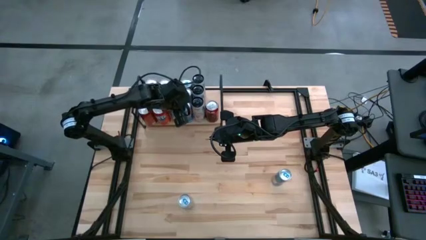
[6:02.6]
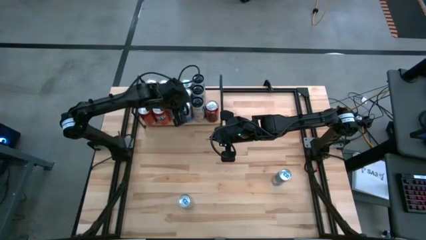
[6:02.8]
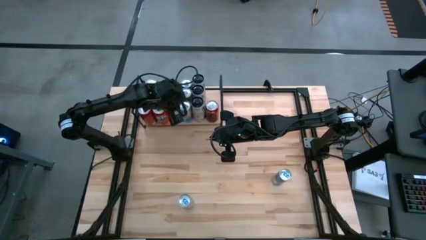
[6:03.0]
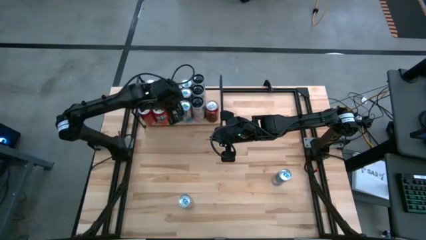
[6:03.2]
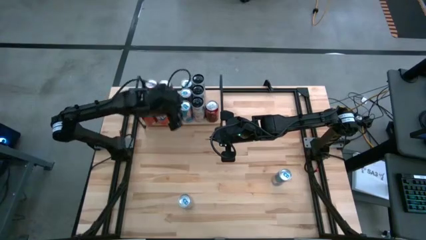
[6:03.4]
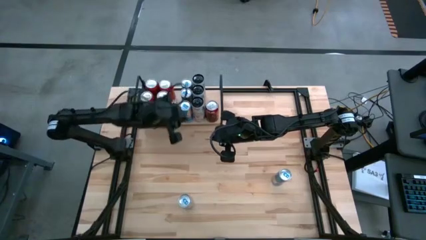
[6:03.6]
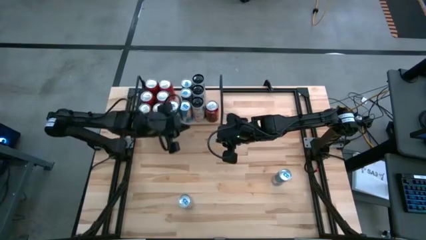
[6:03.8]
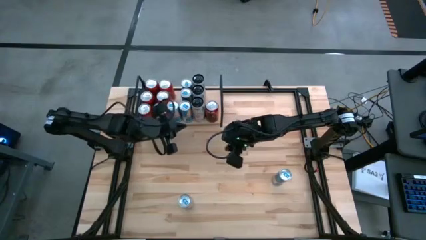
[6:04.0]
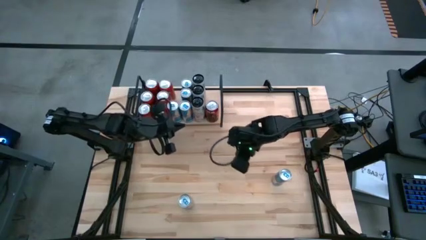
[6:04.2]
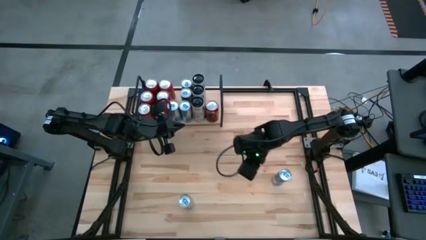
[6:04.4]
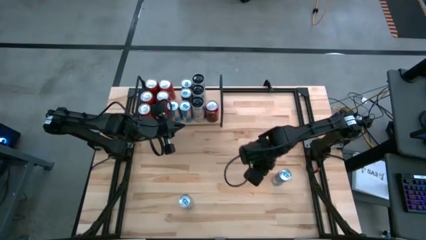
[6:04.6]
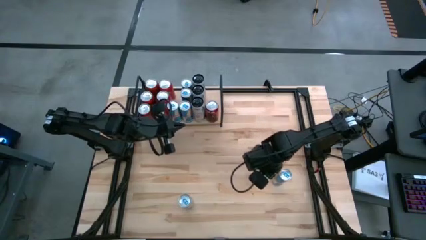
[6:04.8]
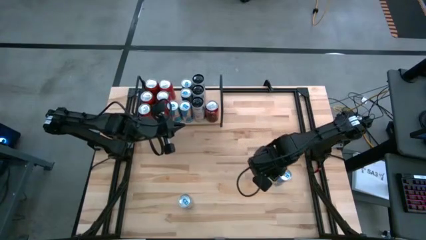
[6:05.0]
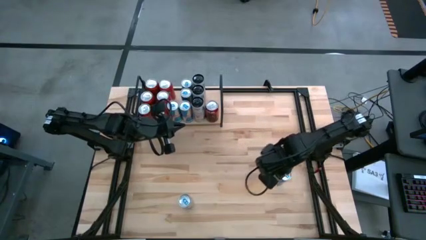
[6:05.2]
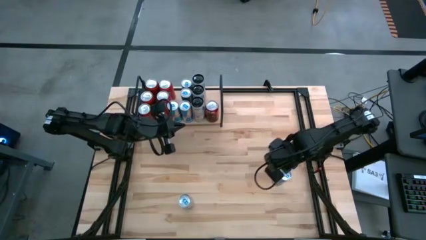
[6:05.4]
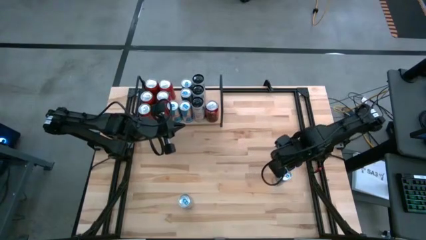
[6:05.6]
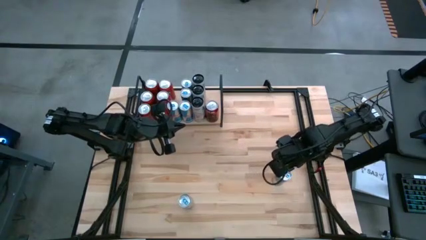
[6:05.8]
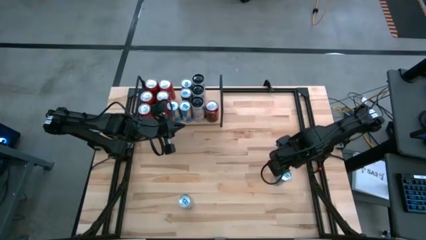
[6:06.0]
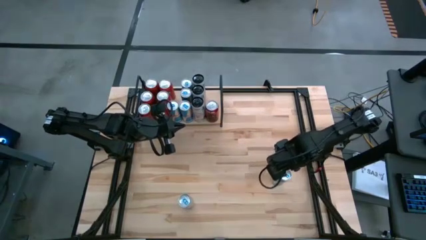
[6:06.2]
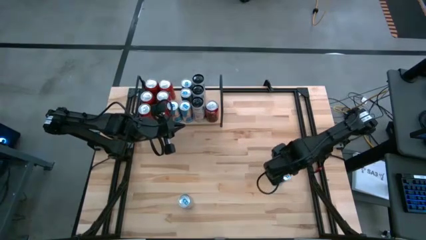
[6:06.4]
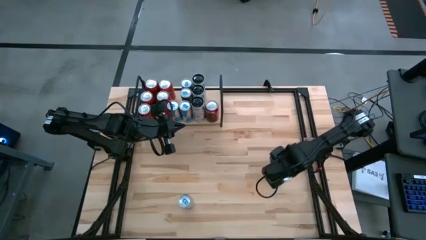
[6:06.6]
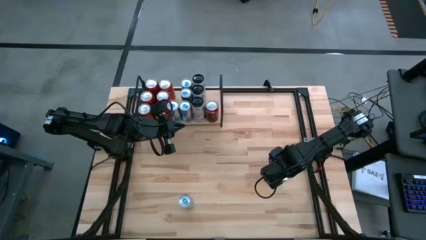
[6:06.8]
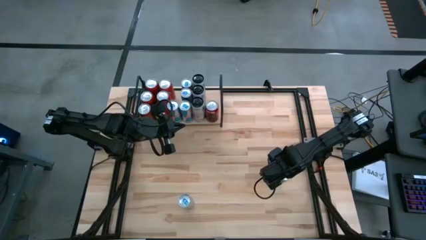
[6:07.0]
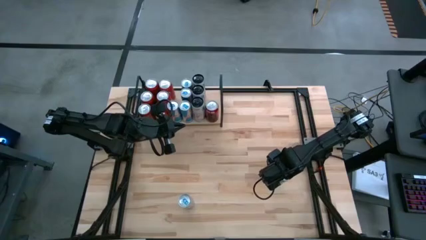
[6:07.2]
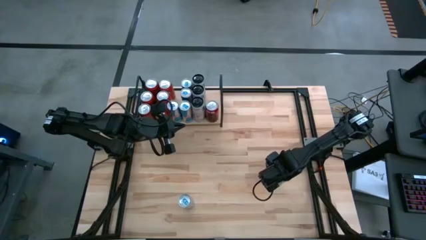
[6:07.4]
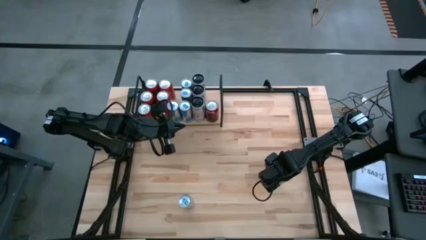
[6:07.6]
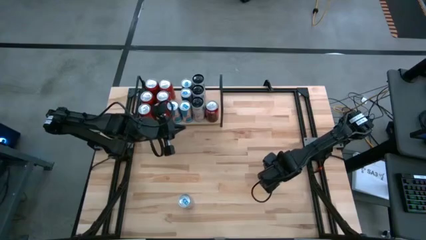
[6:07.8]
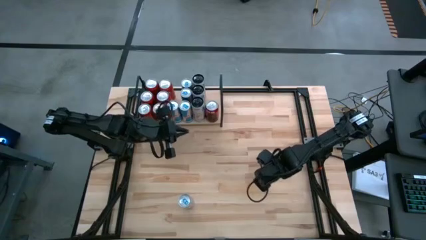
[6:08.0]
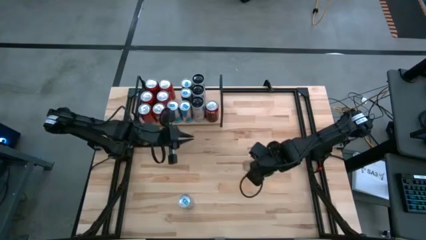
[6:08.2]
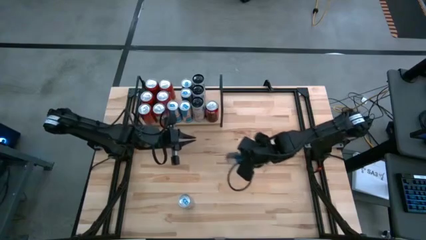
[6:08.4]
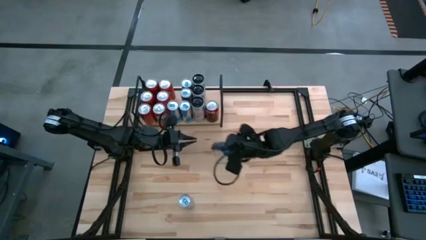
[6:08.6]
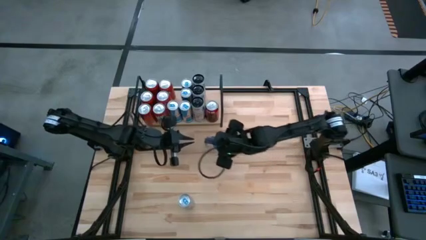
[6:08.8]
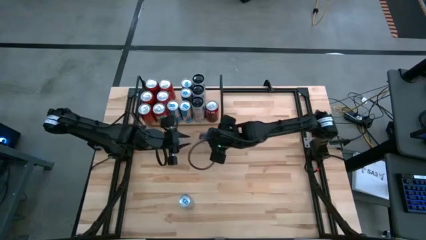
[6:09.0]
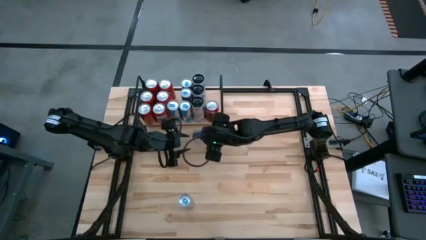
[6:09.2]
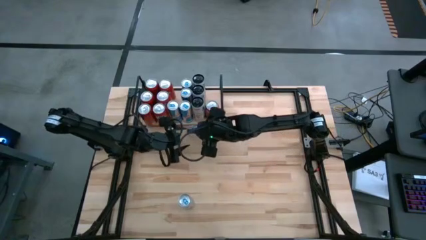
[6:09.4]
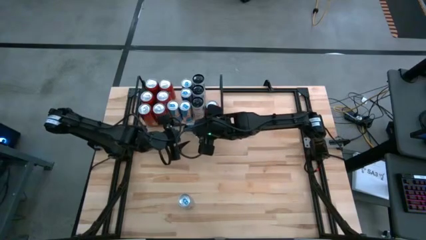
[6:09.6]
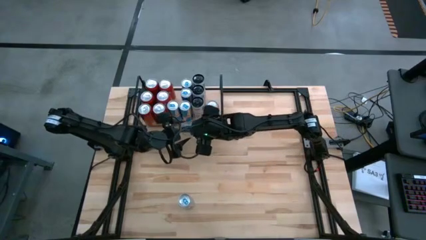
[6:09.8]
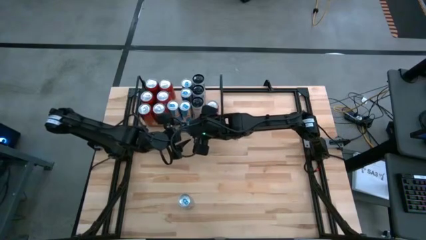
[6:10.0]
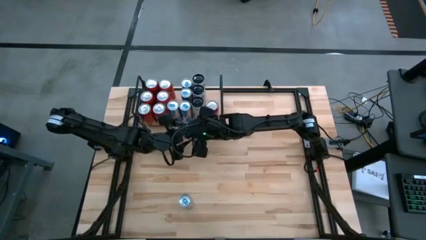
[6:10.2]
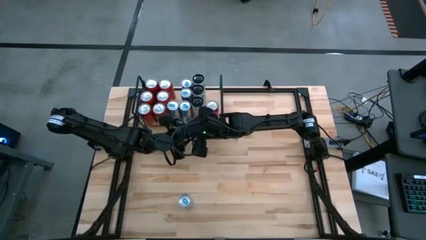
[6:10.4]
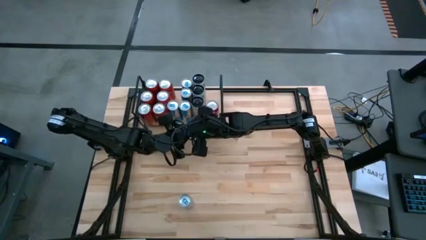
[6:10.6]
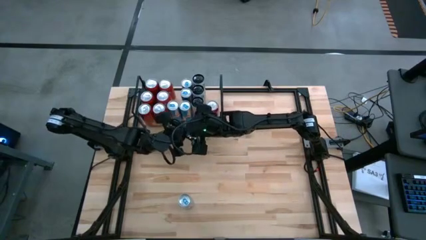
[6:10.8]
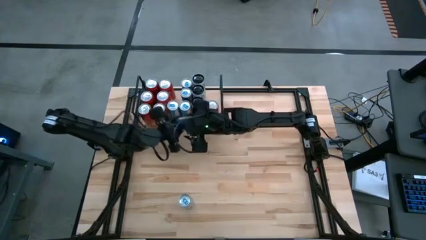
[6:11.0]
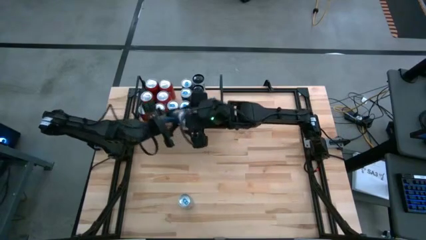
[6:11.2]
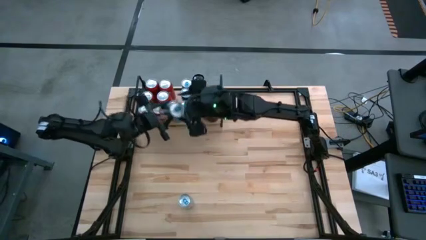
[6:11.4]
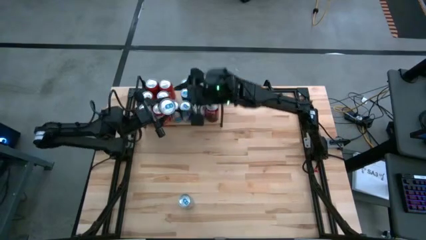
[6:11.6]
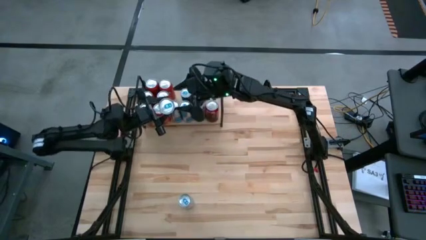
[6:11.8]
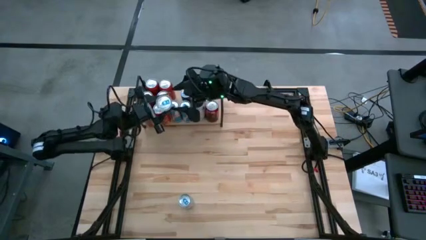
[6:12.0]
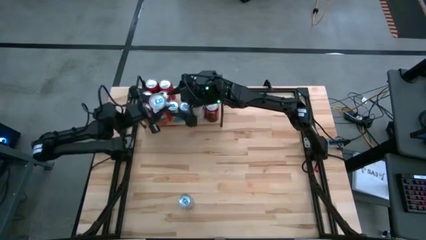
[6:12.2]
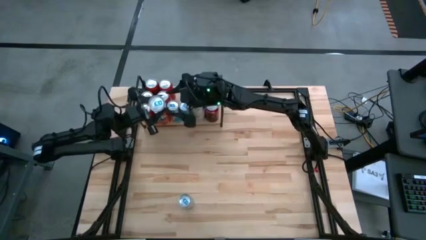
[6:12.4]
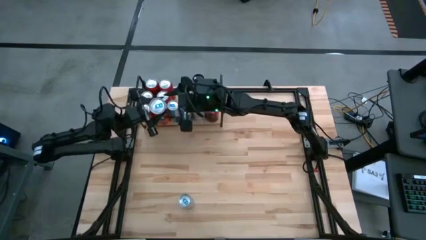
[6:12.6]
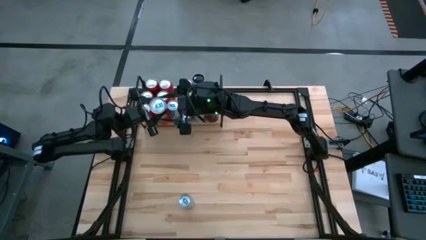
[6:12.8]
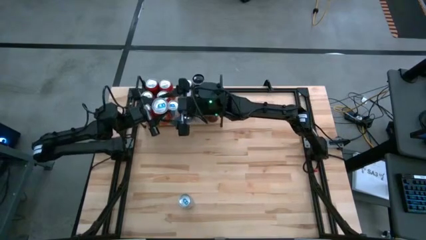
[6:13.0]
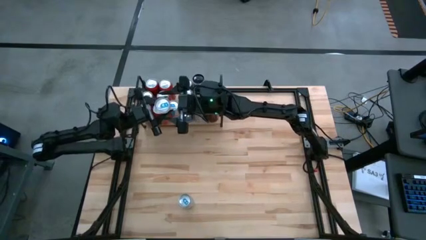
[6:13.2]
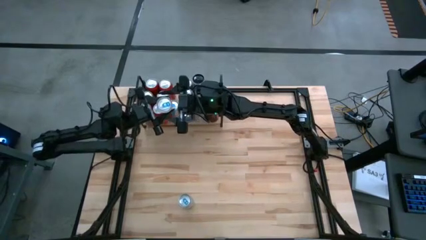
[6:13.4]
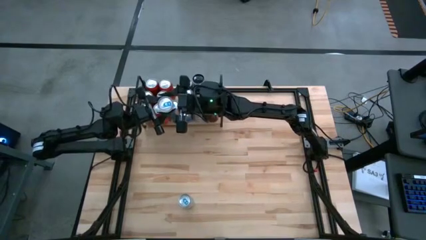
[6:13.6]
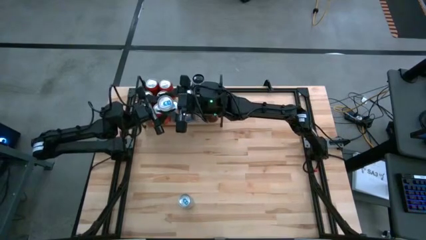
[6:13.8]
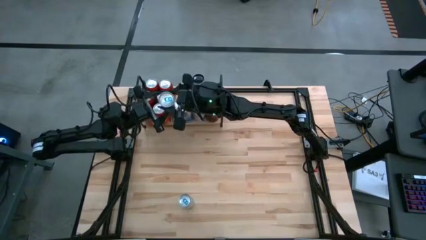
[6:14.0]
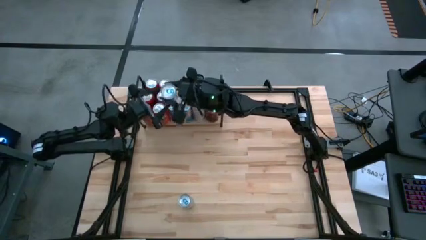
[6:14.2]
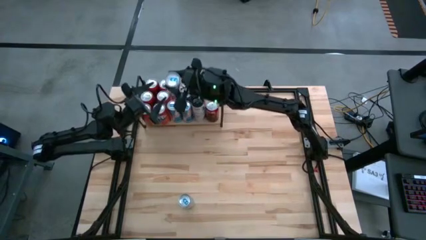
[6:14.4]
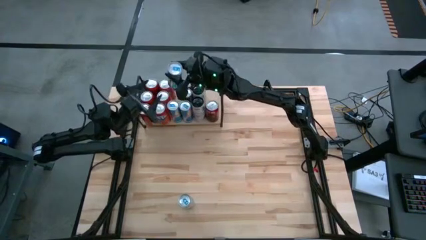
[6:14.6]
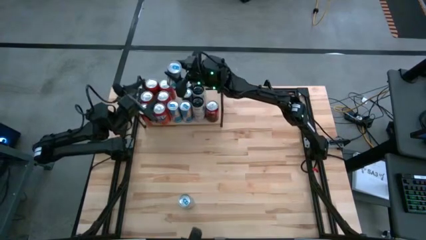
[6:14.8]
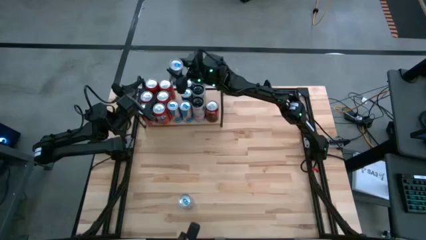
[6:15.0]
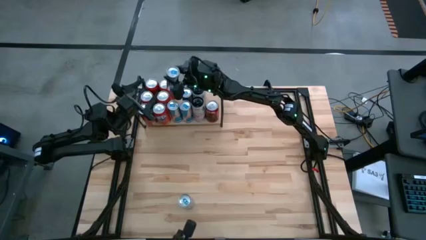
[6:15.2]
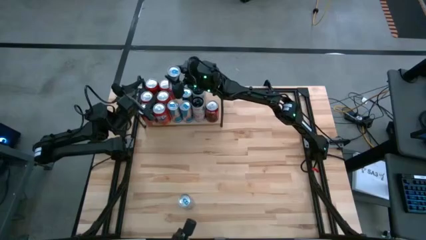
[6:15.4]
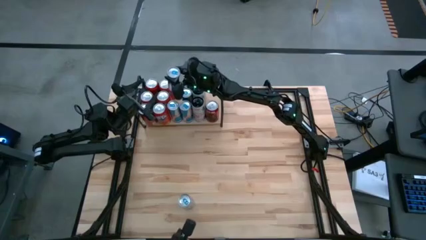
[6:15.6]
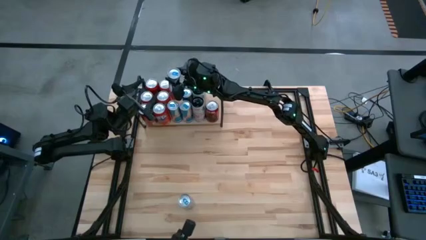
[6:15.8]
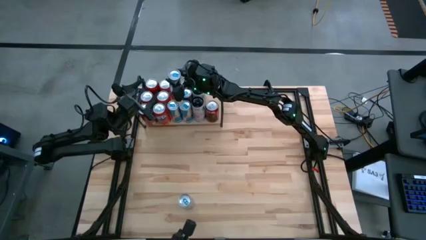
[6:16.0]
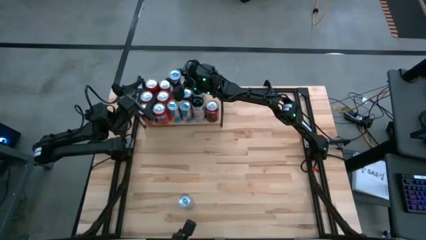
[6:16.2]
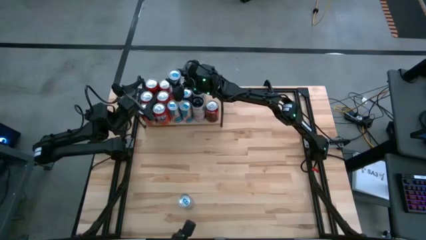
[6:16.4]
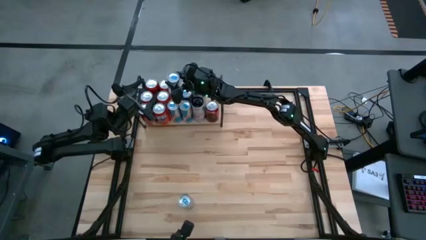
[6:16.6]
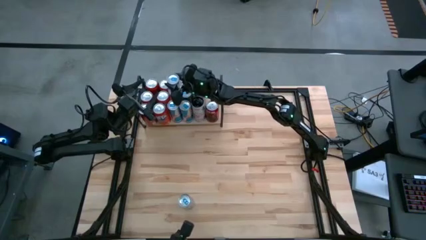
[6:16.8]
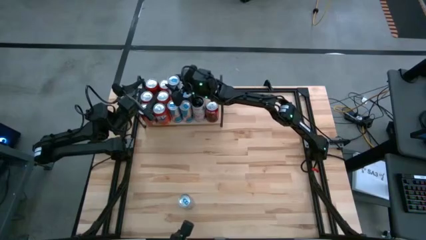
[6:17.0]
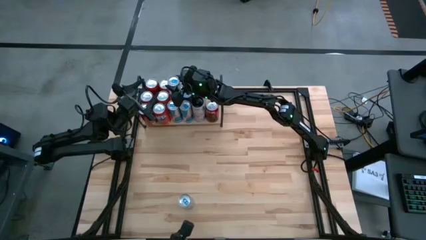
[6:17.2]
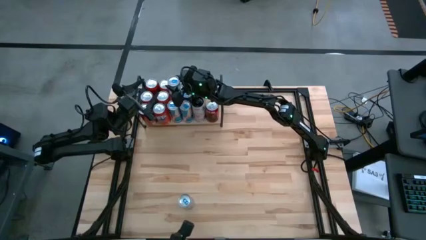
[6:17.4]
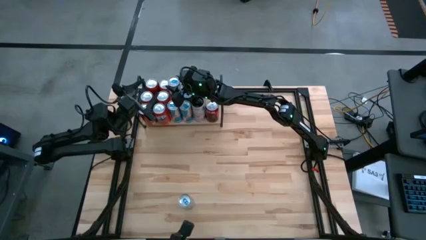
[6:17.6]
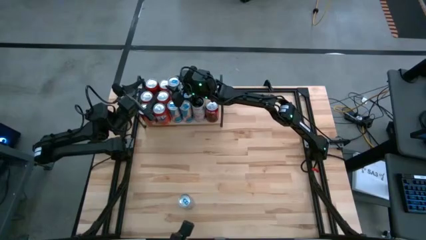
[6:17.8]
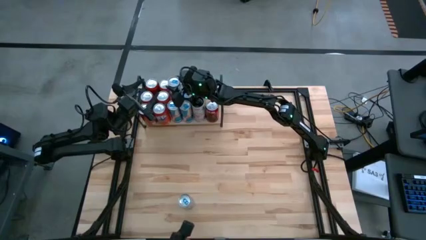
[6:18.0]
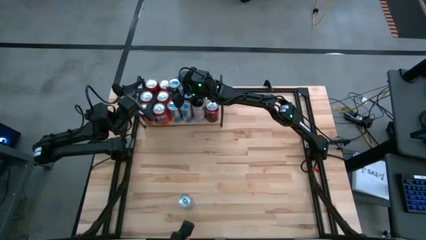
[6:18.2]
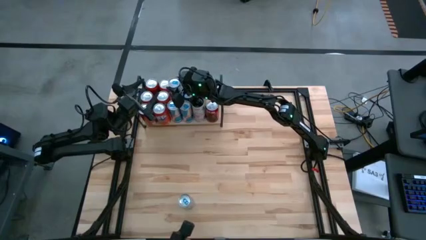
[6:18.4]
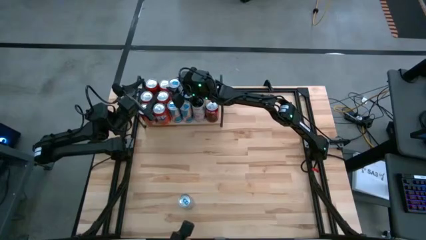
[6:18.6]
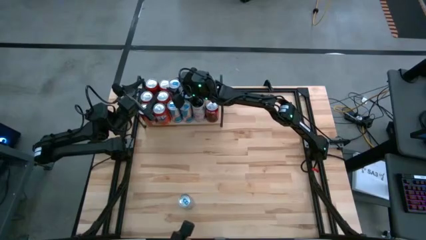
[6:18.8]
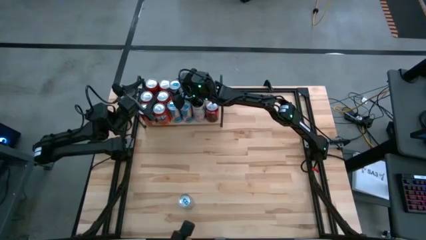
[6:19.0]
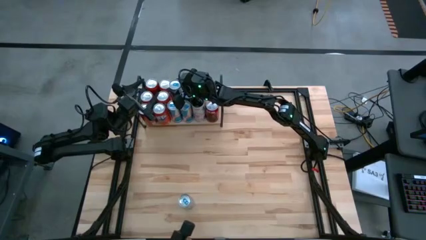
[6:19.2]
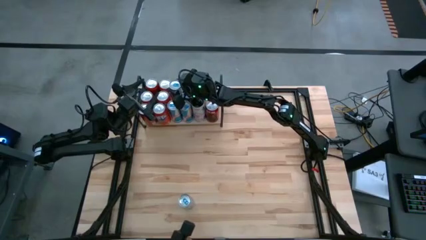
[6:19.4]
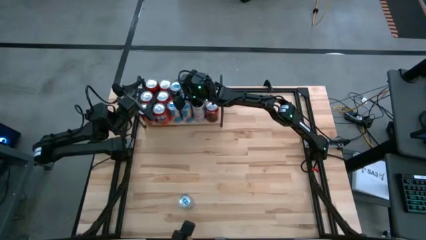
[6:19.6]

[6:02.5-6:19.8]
Task: Place canned beverage on shelf
Put the blue soda can on the shelf aligned with the other blue soda can
